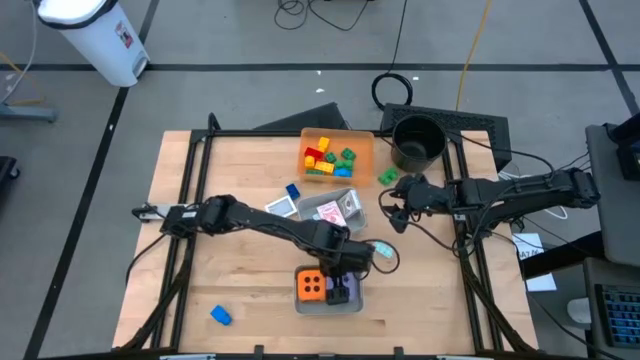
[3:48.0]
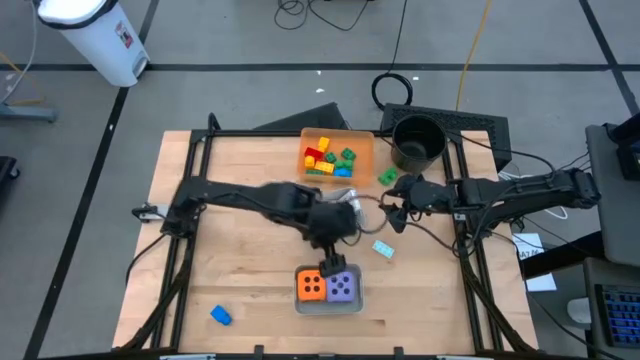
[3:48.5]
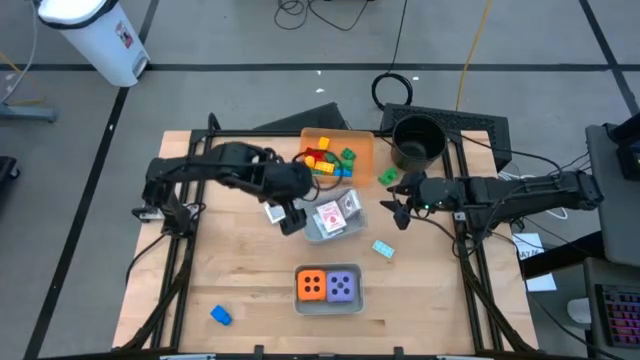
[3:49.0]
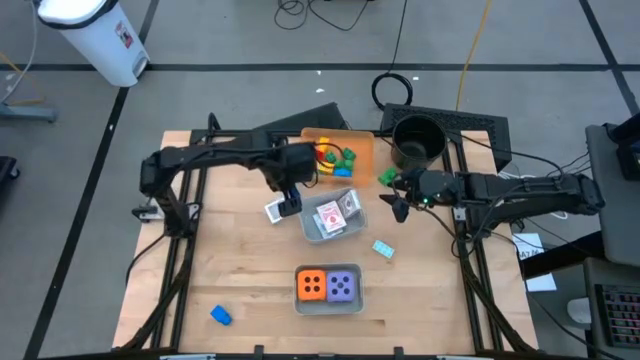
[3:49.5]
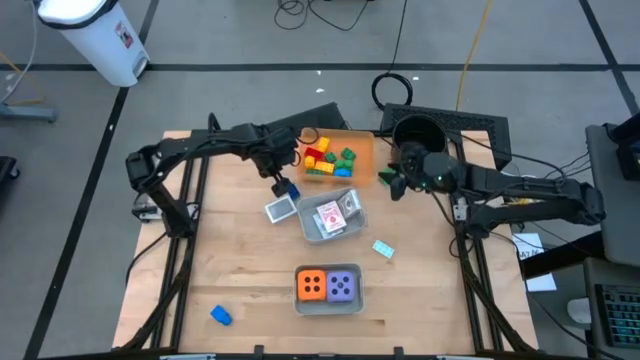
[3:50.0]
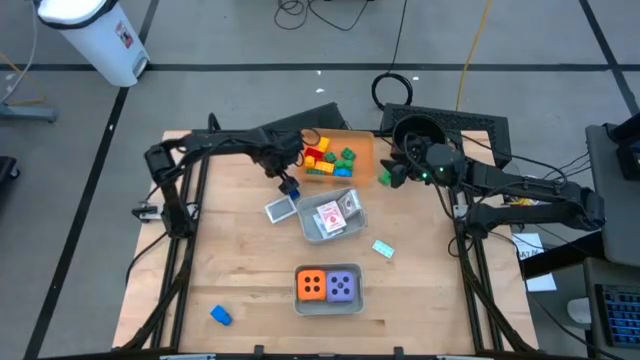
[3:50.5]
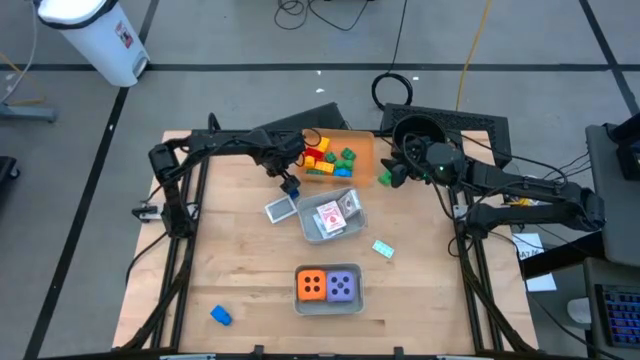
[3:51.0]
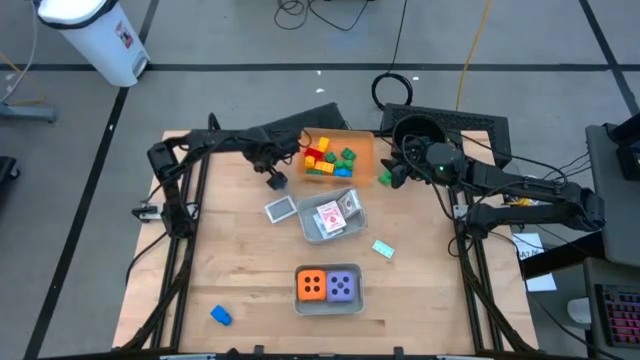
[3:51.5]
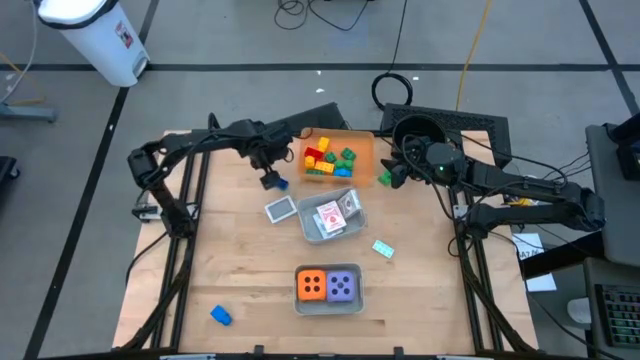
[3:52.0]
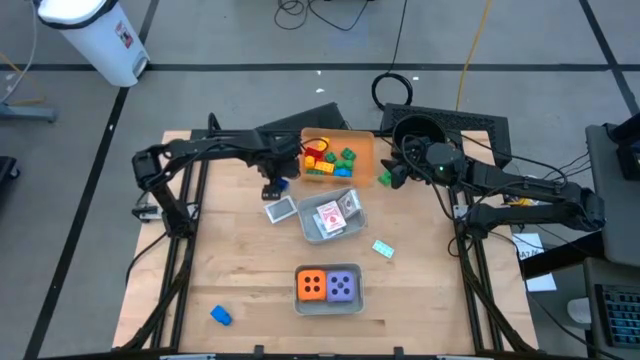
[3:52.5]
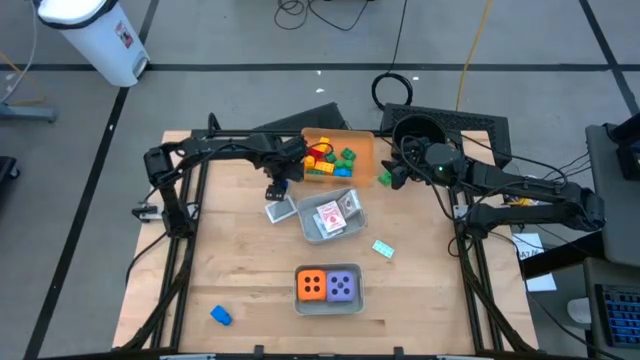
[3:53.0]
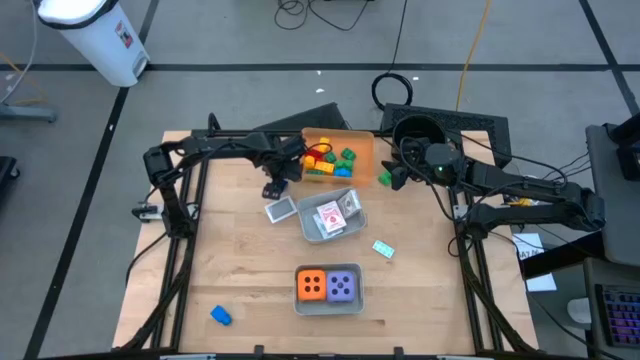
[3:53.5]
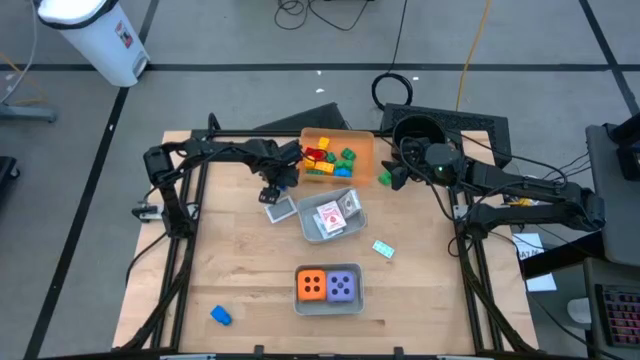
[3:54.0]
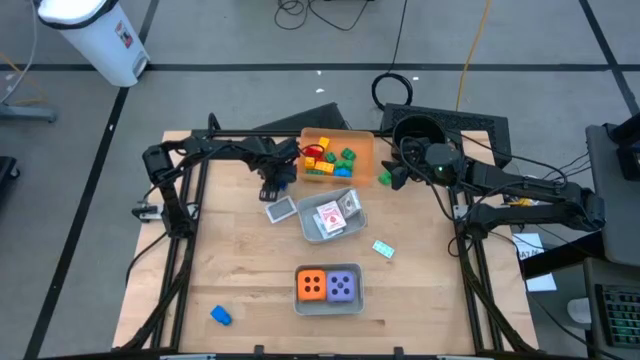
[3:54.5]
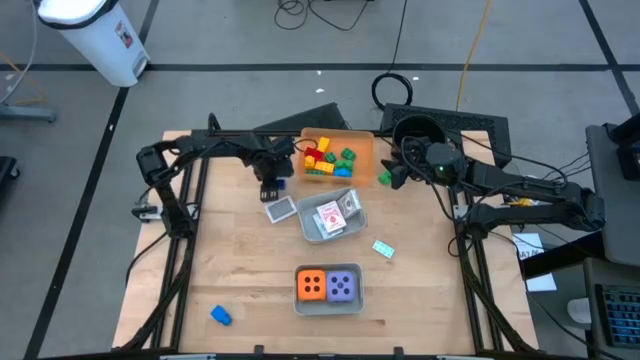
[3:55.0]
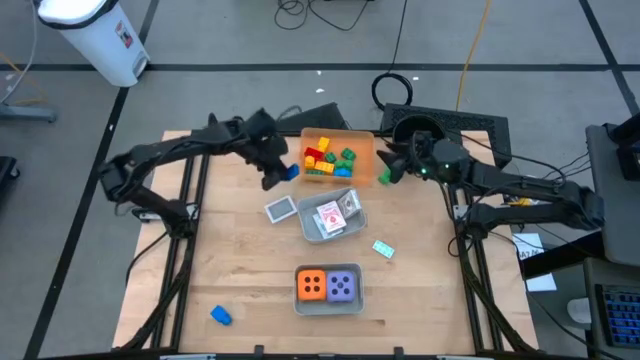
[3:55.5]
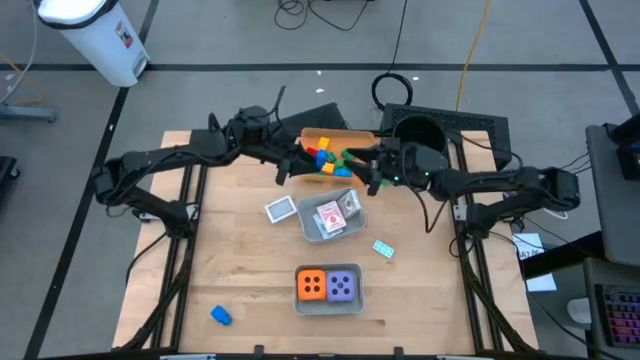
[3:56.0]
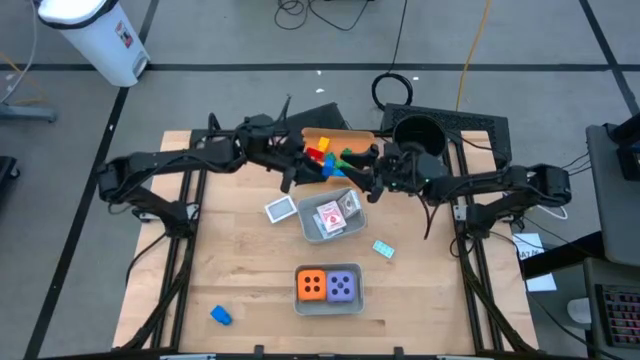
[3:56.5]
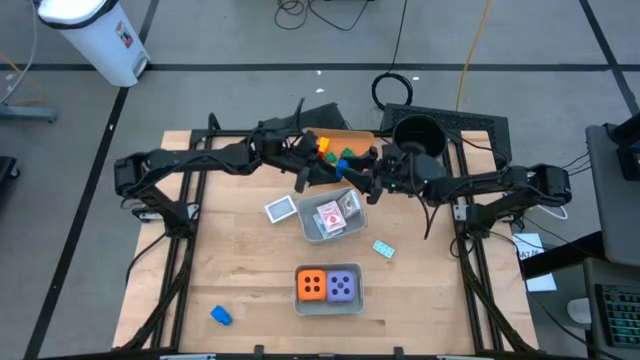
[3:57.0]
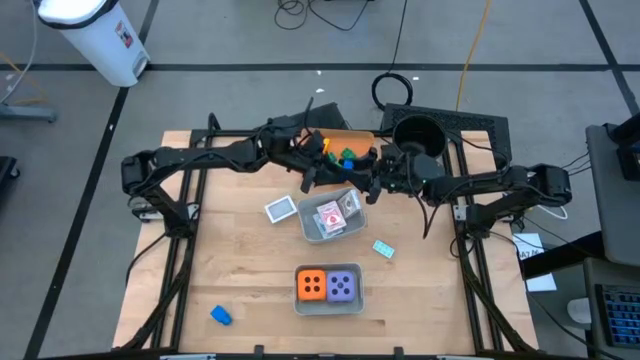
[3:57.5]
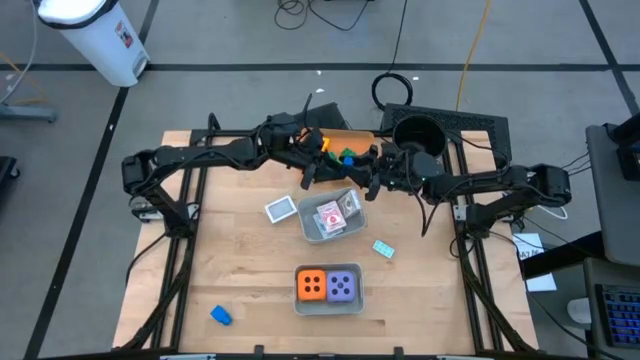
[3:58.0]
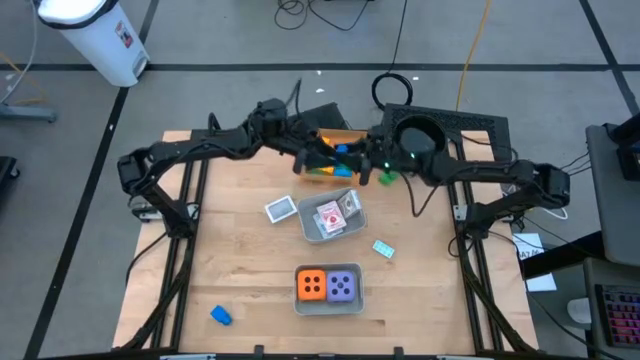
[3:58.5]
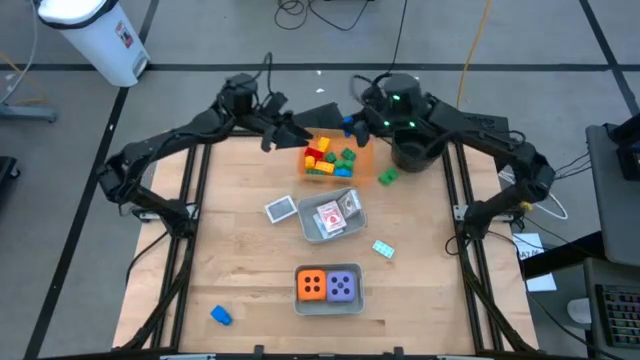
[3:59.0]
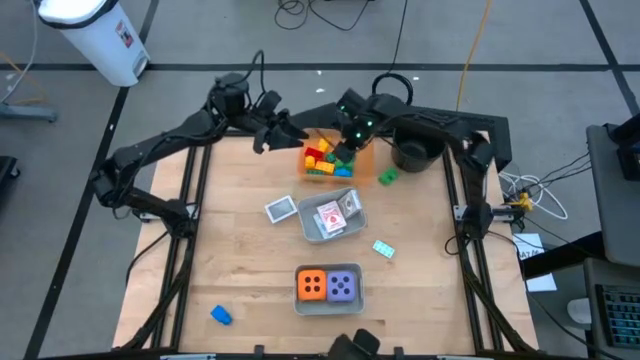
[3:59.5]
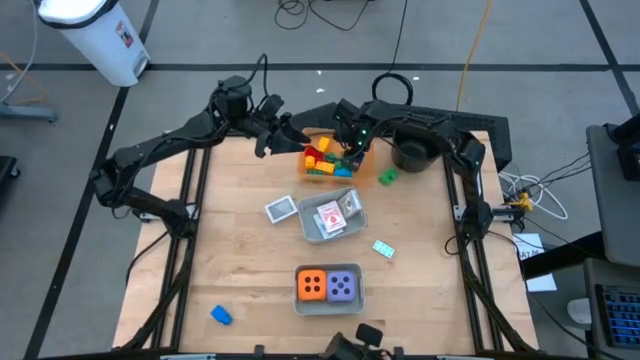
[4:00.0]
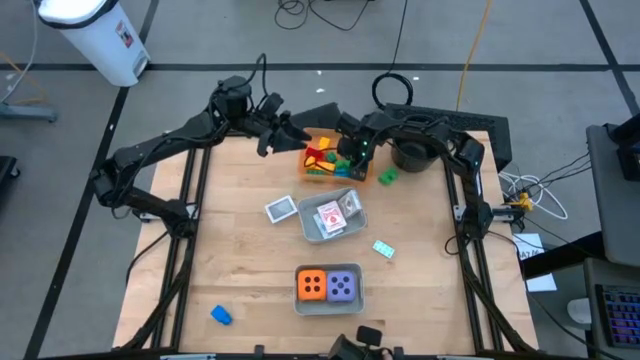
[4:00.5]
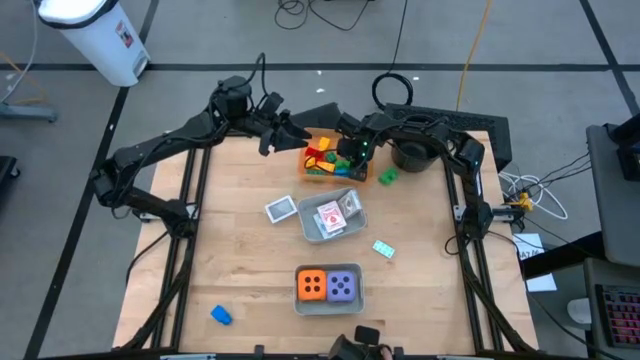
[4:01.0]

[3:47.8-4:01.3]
Task: Pick & Place Toys
Put the blue game piece into the orange bin

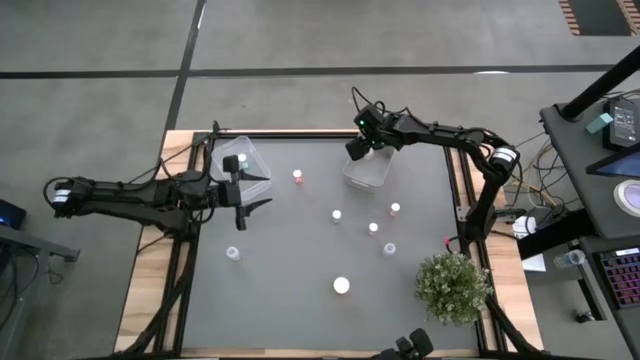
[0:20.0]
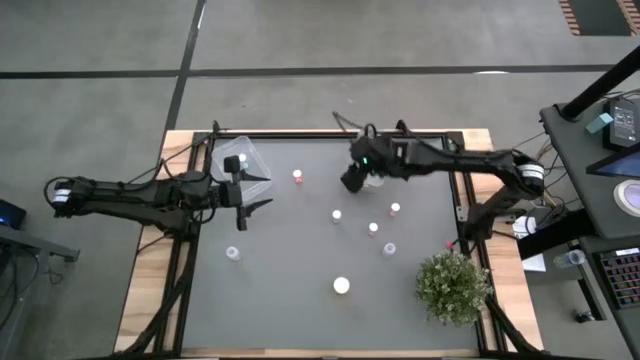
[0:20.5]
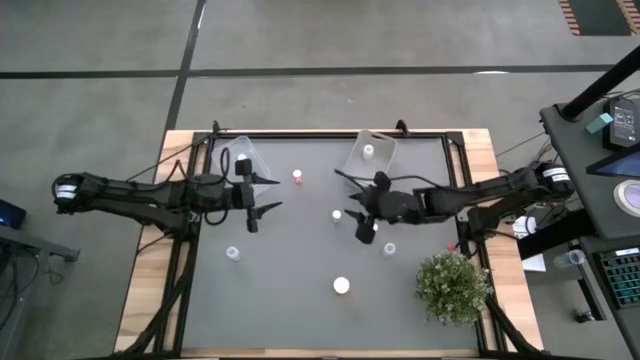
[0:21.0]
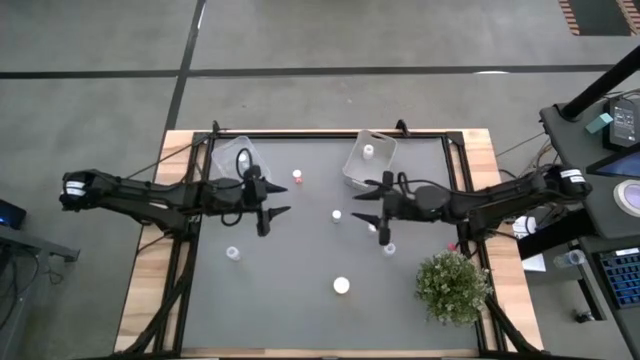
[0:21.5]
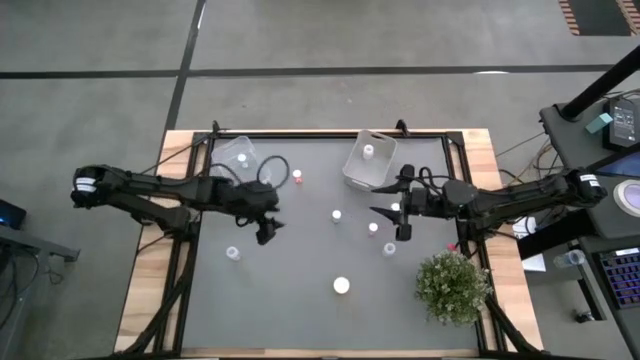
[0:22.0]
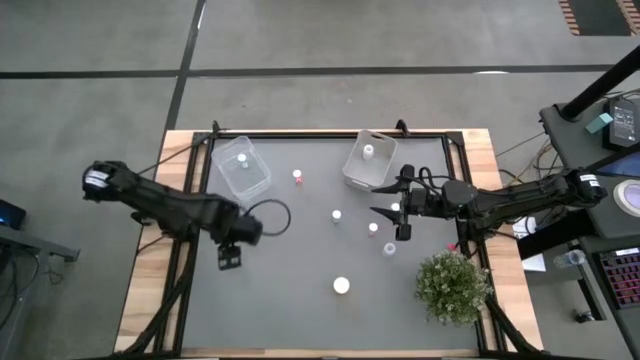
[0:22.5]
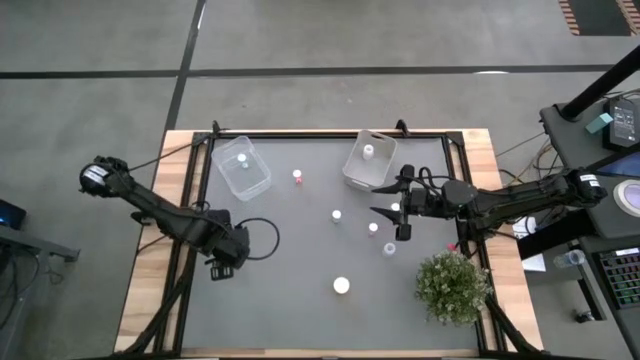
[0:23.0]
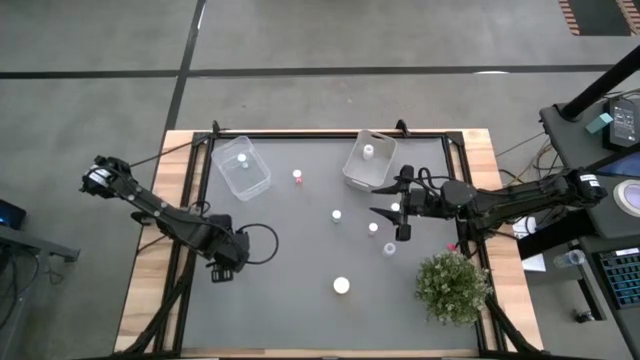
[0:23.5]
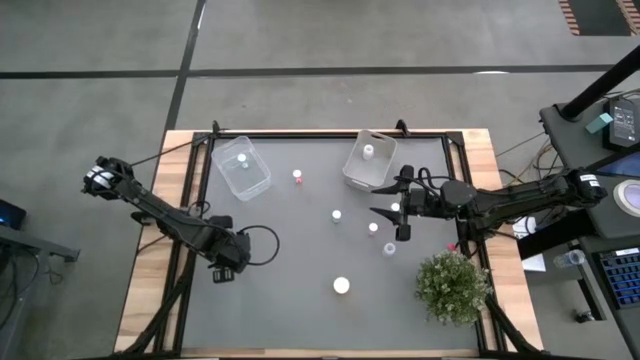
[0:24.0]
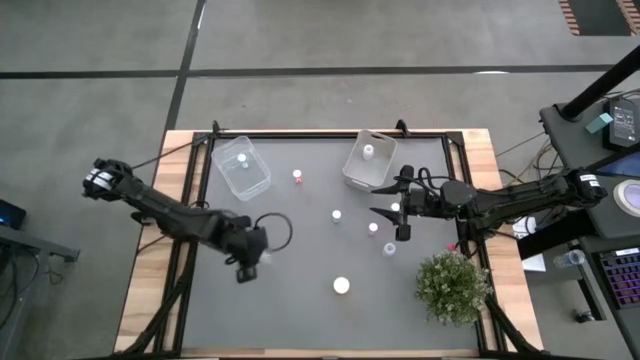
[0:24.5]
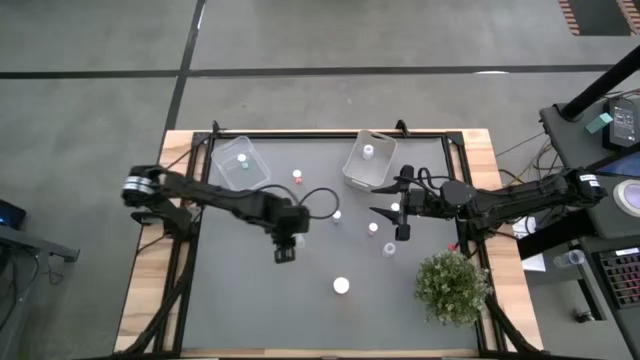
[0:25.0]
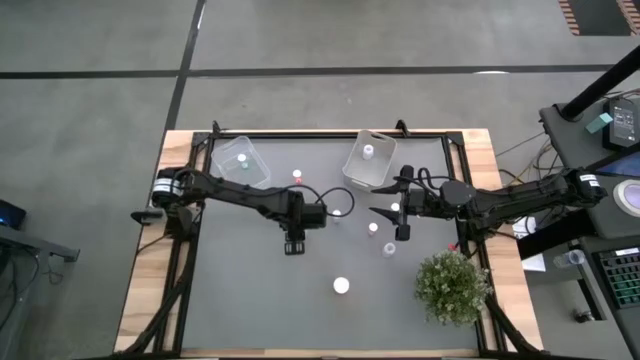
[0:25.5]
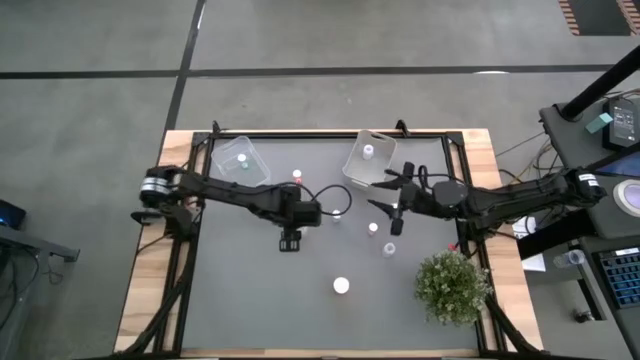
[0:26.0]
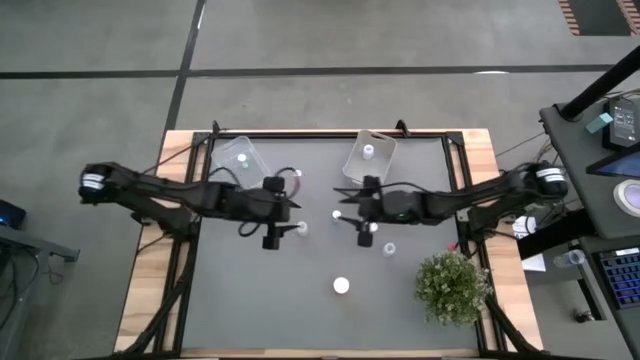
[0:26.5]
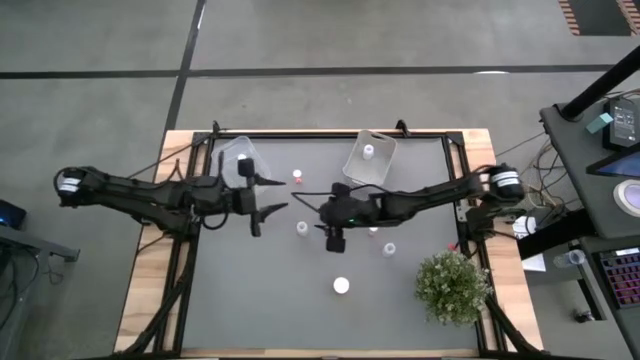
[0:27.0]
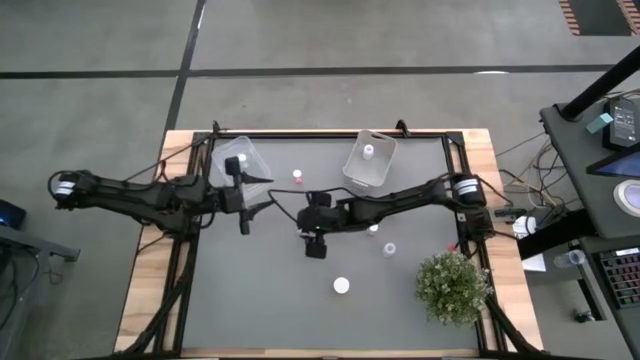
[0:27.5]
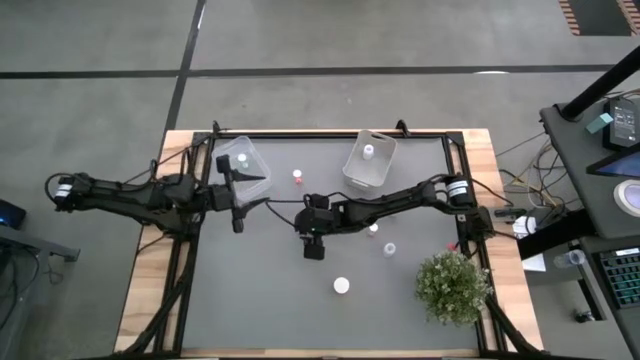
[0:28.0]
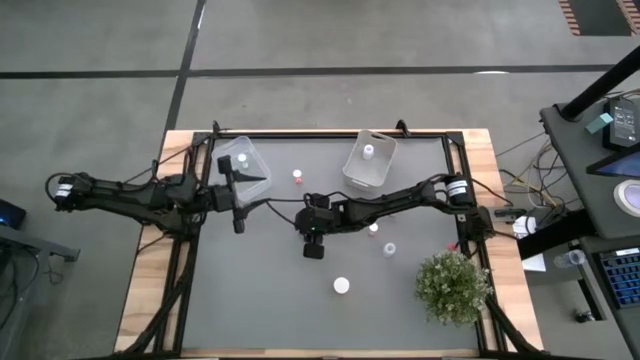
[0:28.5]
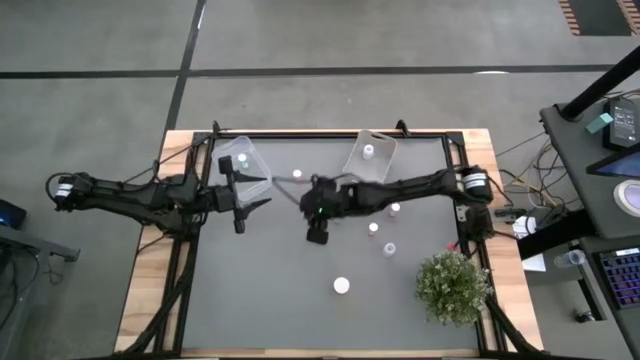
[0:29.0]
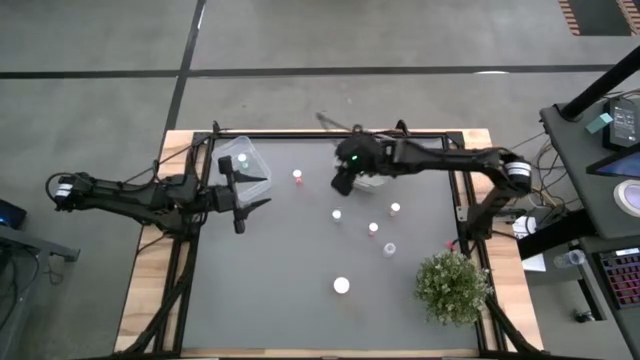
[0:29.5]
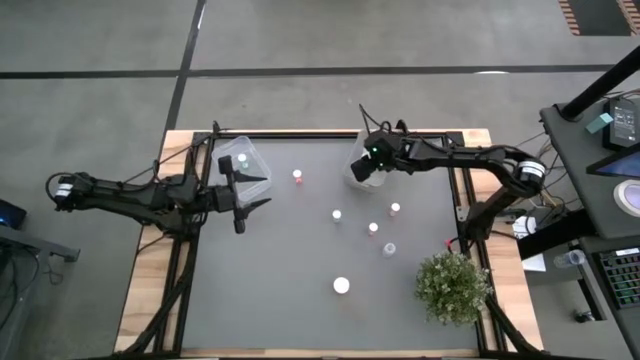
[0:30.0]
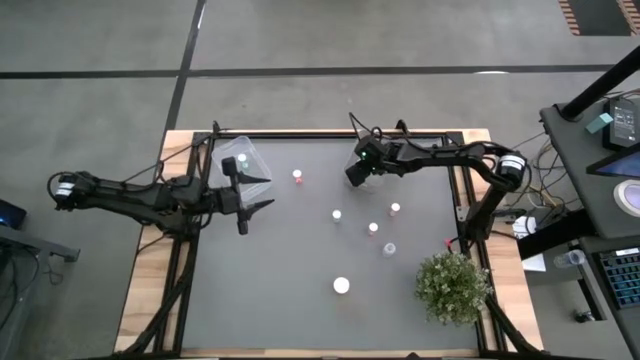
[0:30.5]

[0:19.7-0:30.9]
Task: Pick and place medicine bottles into bin by pill shape (circle, oval)
Put the left white pill bottle into the gray bin
